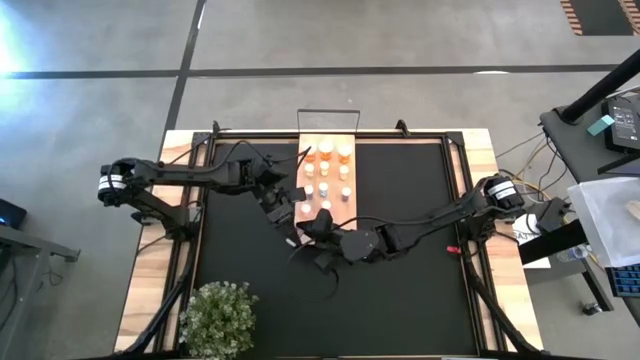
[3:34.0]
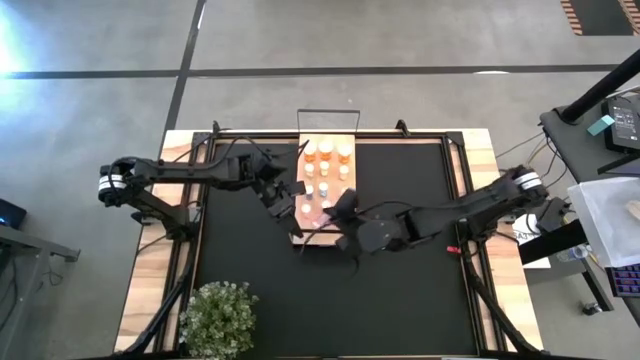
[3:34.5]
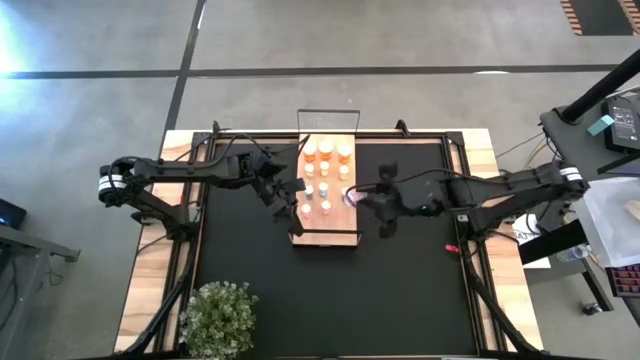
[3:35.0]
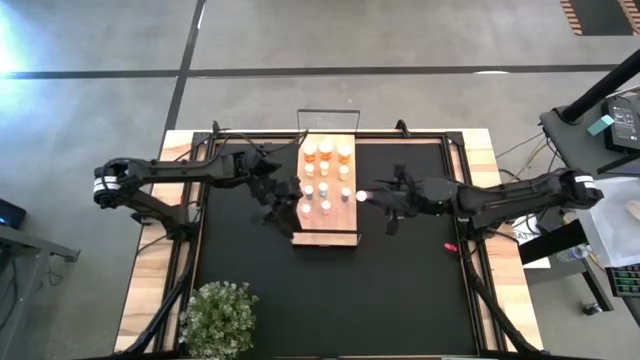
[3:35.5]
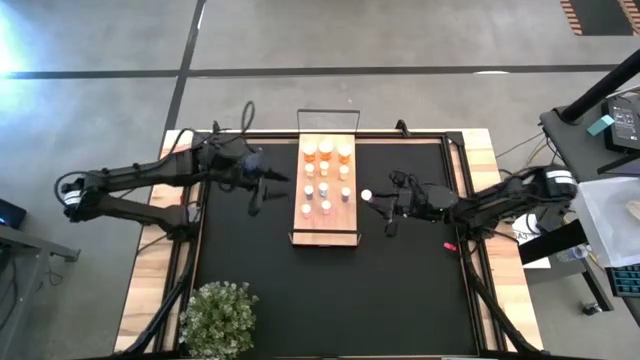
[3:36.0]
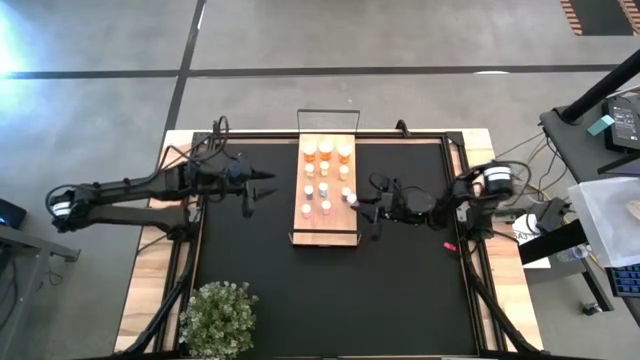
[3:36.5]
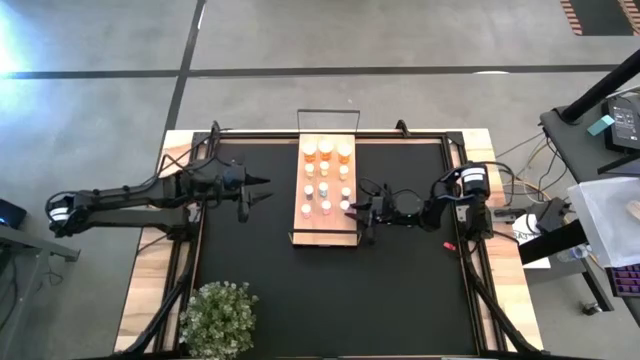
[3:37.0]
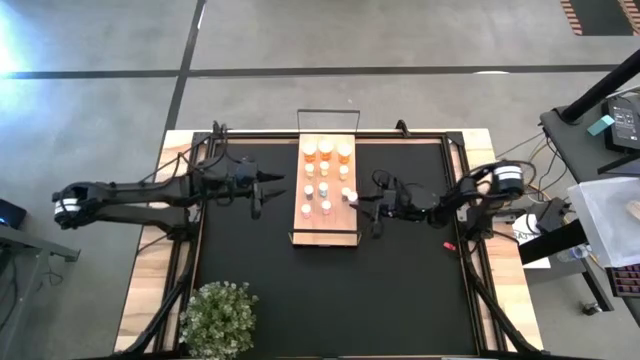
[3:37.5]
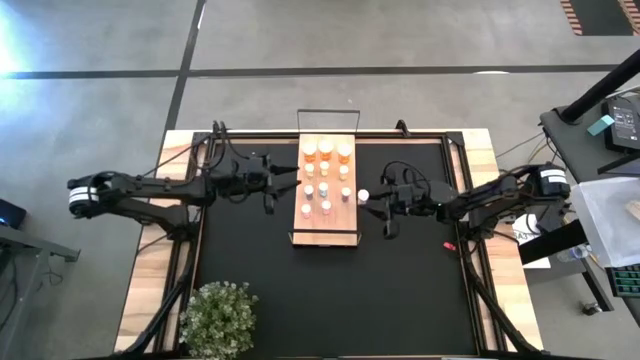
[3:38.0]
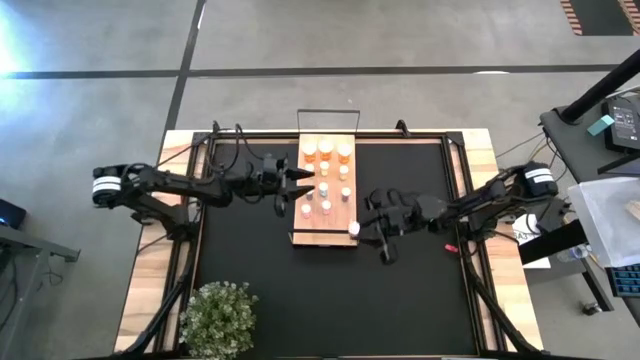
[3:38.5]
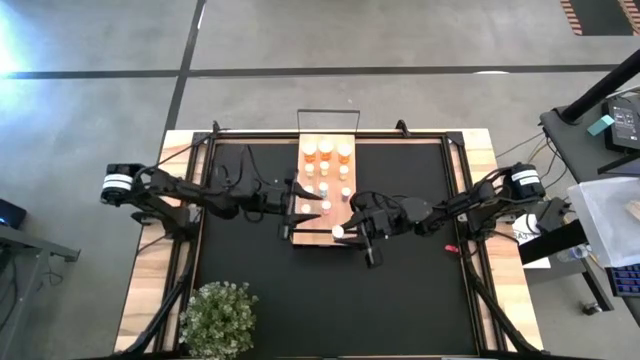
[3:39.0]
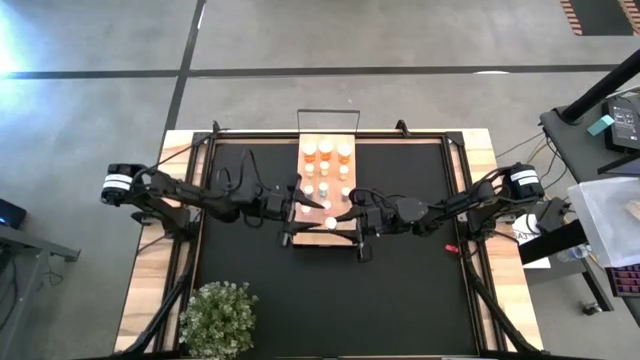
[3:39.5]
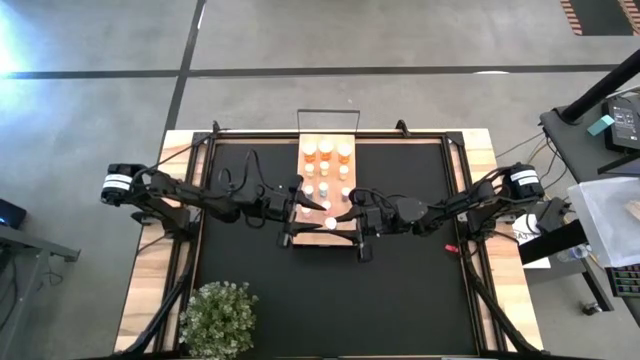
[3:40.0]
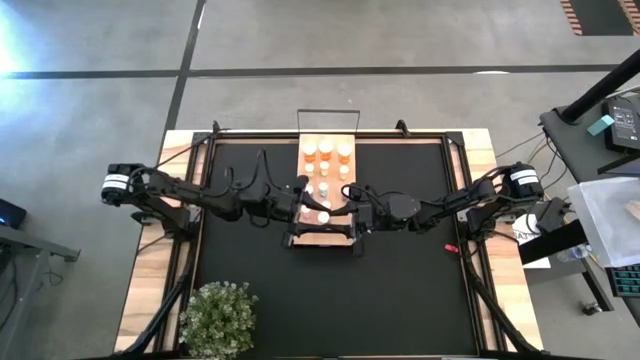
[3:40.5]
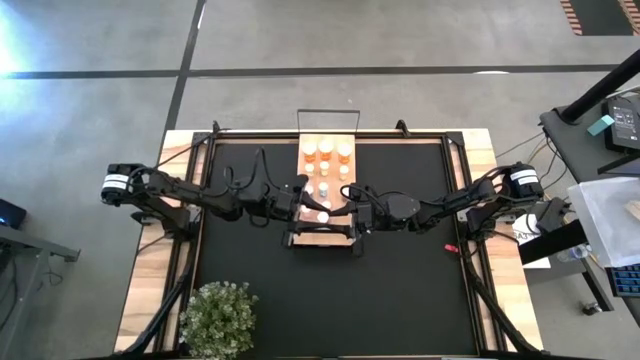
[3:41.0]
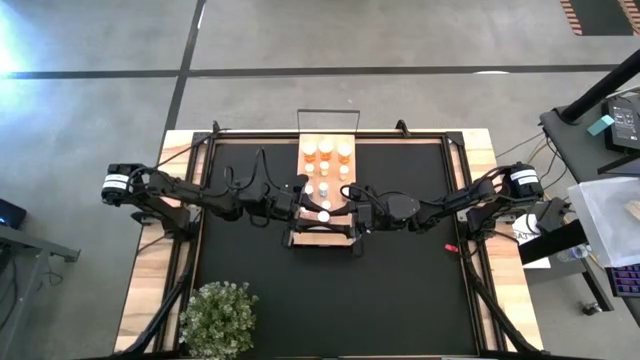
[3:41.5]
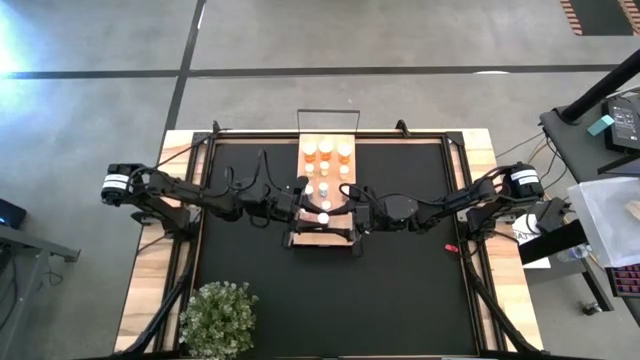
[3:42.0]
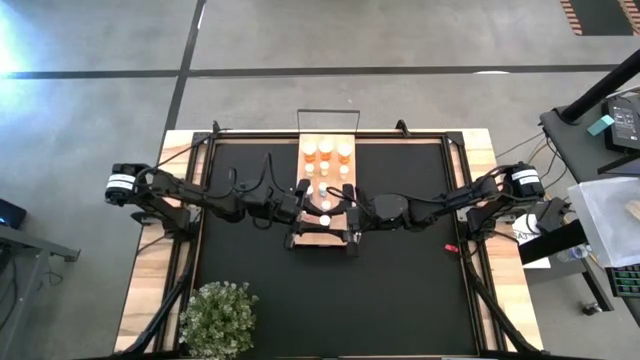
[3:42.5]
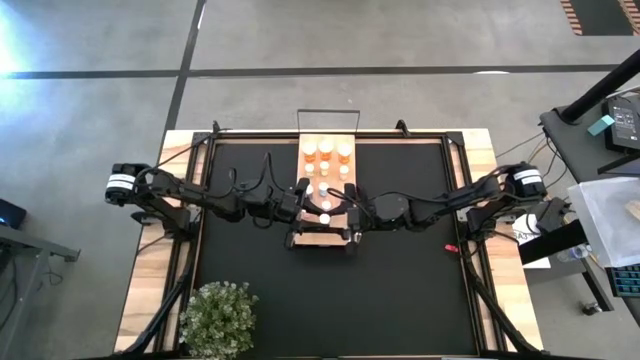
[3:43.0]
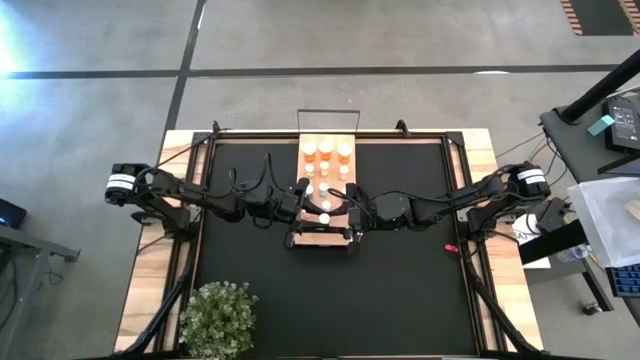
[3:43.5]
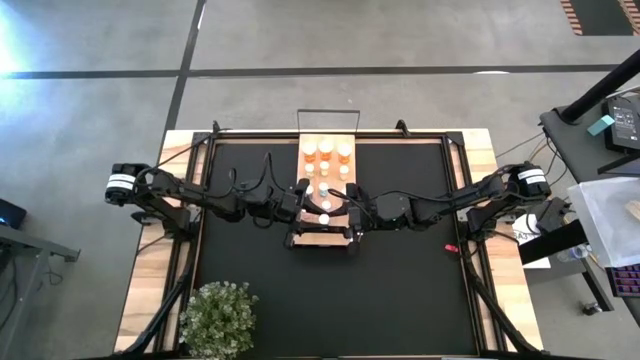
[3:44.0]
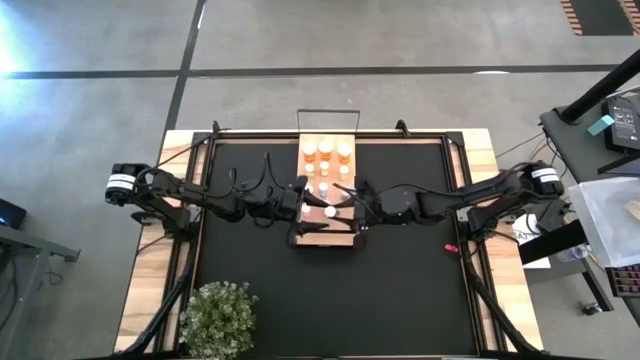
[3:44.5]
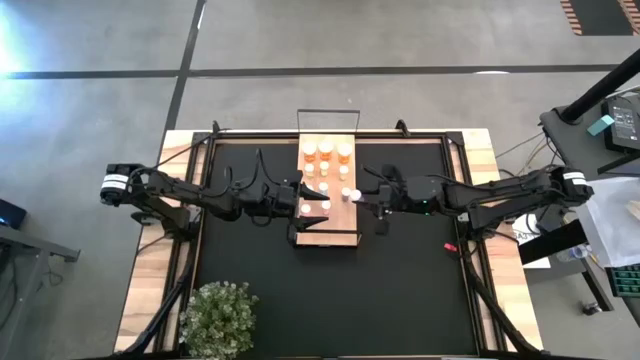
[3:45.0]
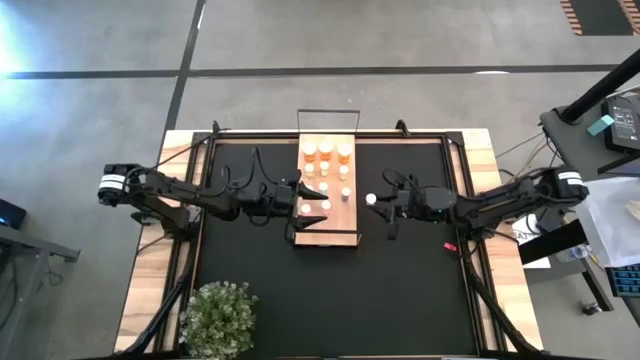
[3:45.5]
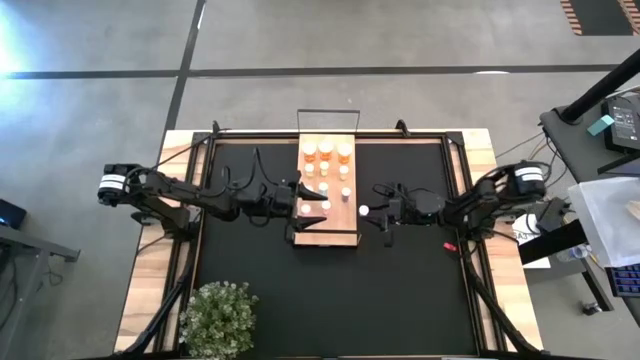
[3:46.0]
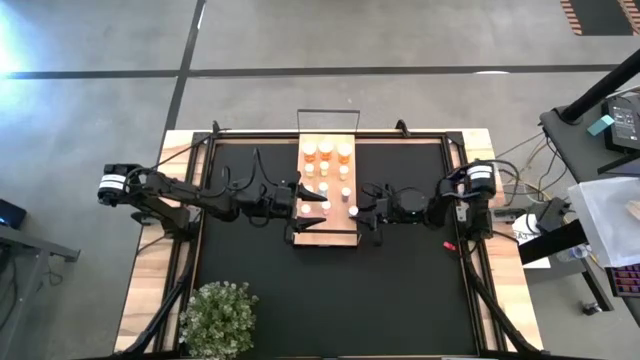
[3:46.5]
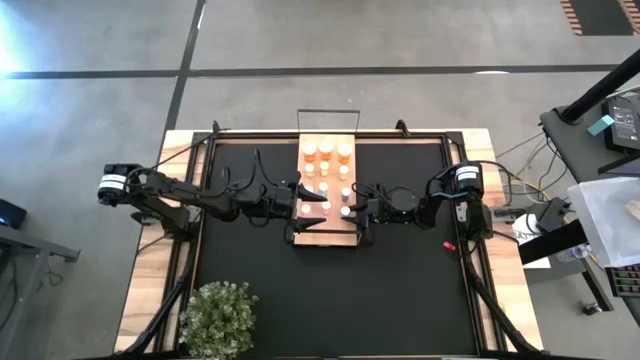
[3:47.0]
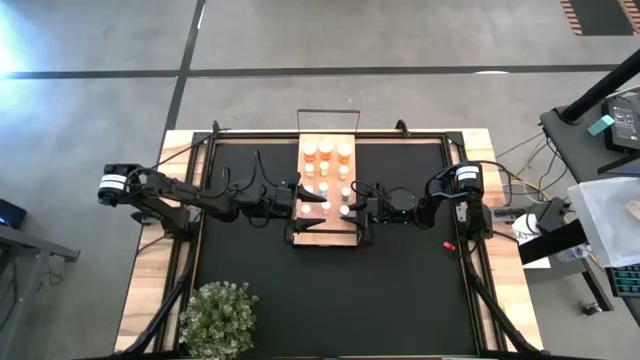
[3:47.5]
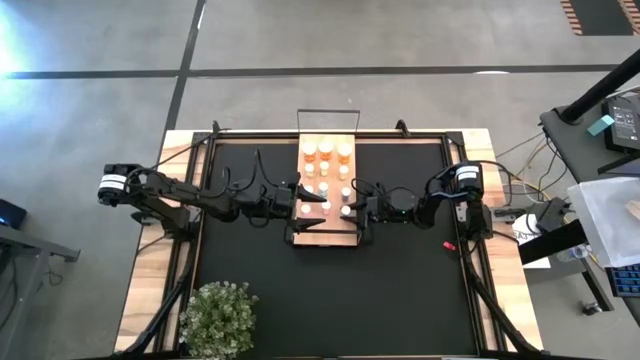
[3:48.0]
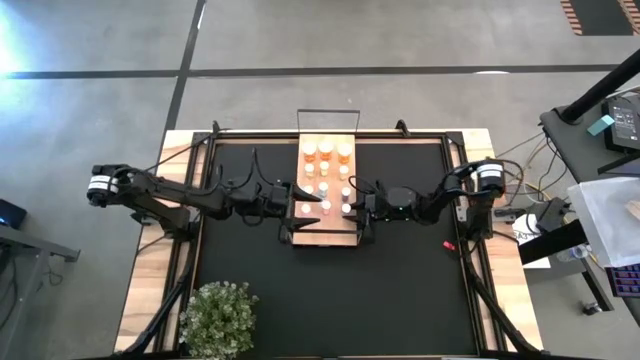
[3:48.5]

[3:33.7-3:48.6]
Task: Pick and place medicine bottles onto shelf by color
Put the pink medicine bottle on the shelf aligned with the other pink medicine bottles

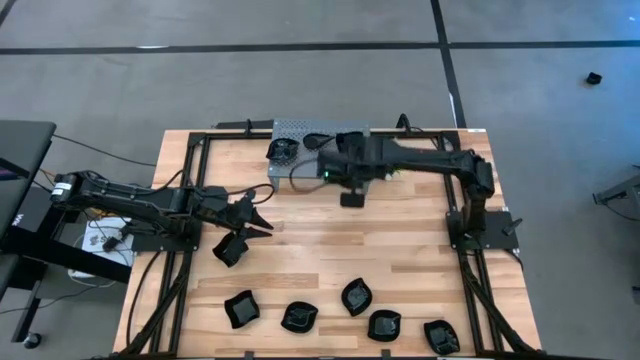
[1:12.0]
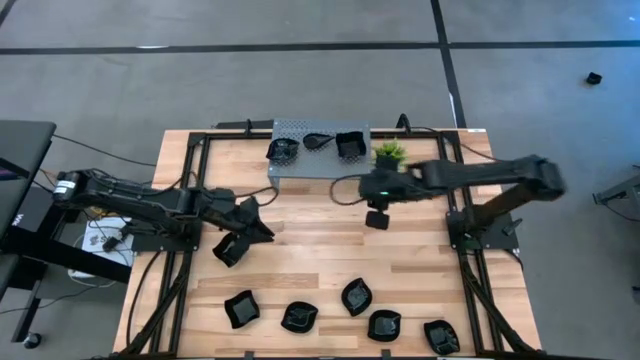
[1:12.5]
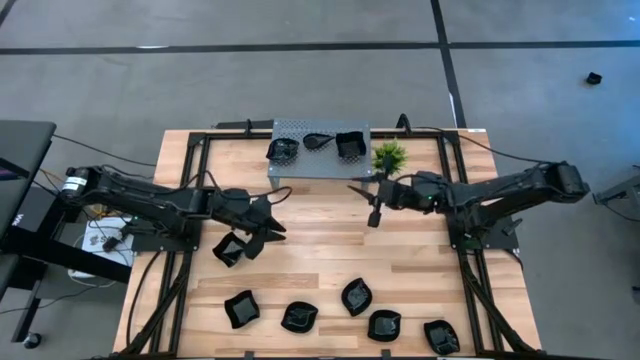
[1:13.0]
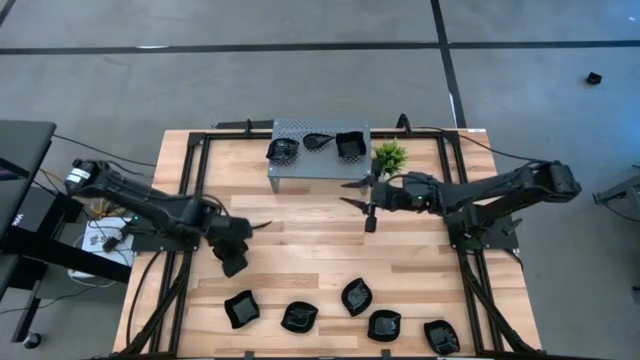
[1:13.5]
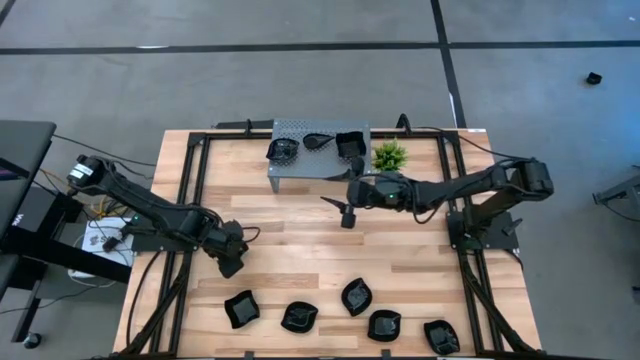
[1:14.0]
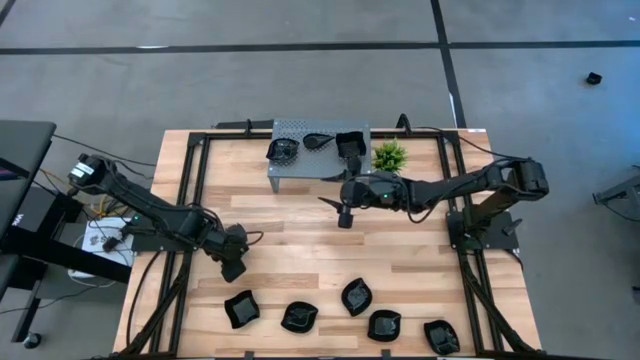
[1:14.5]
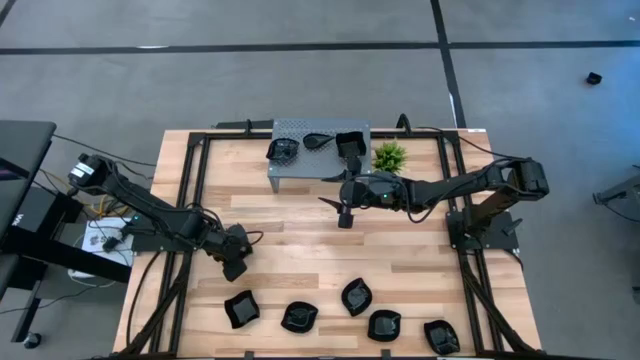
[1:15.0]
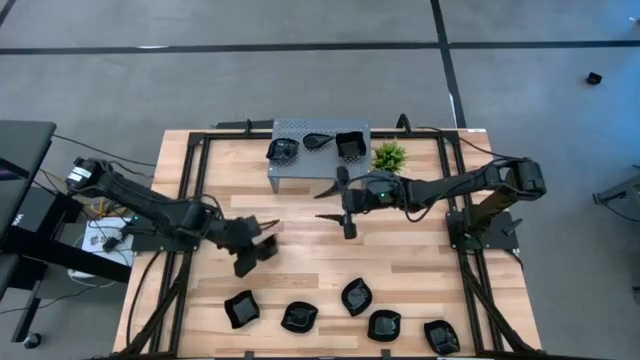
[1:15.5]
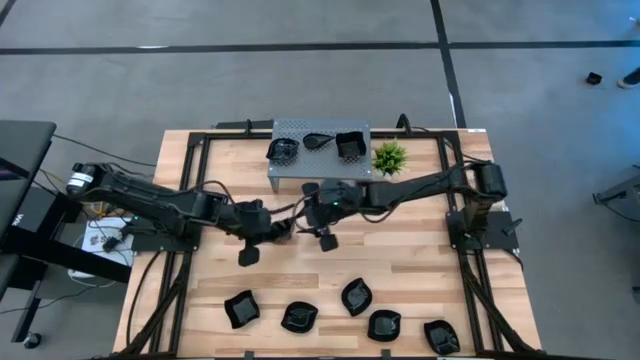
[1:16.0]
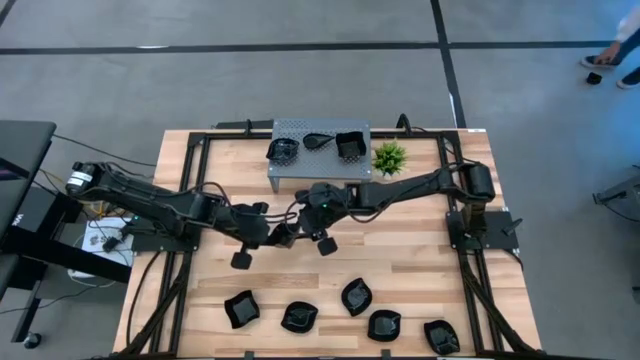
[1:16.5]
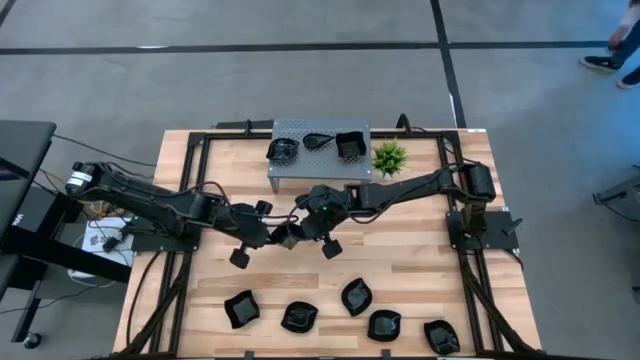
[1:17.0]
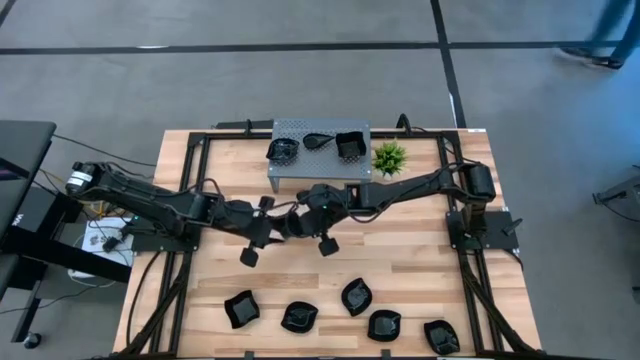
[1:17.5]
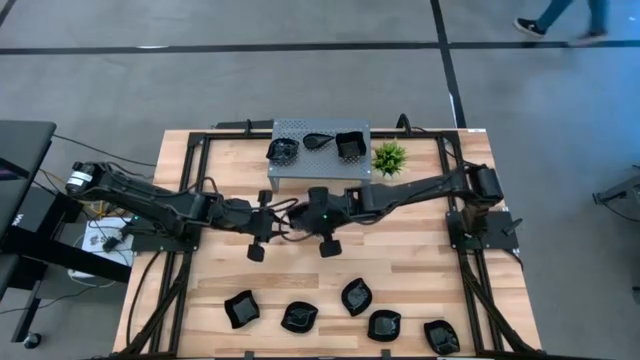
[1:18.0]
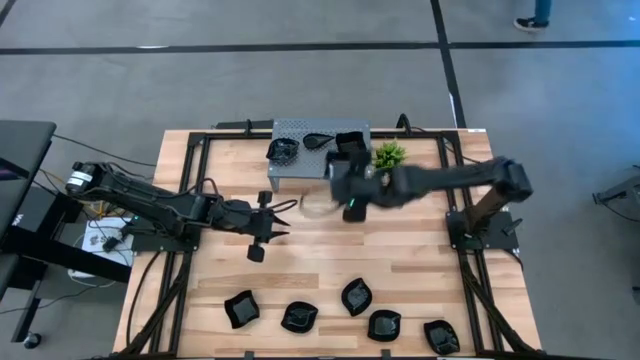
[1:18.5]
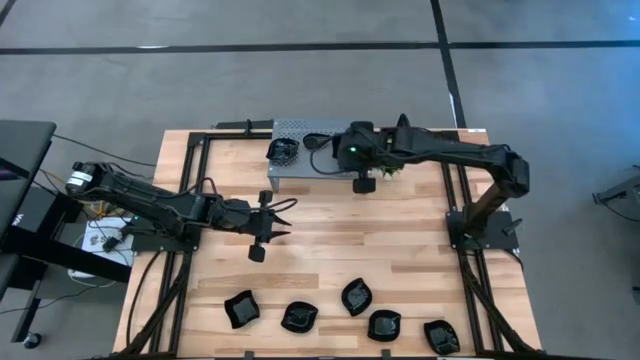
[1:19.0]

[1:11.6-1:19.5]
Task: Pick & Place Mini shaped plates
Stack the distorted square plate on top of the distorted square plate on the shelf
